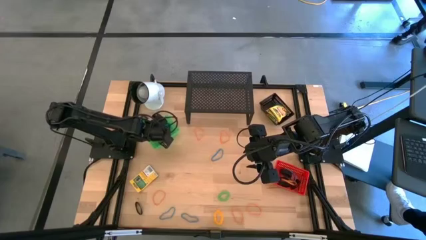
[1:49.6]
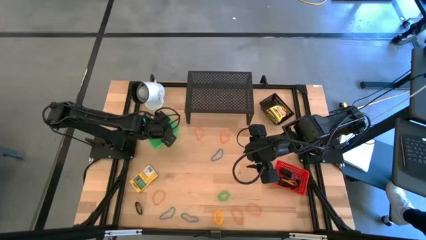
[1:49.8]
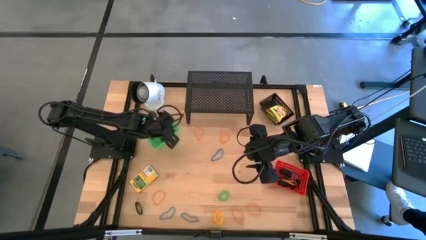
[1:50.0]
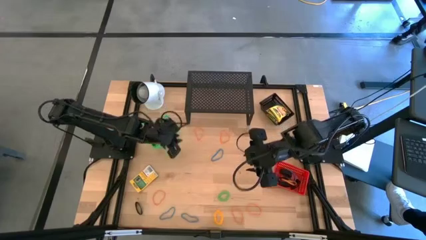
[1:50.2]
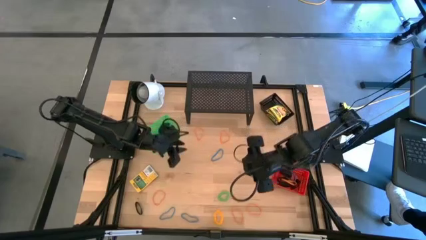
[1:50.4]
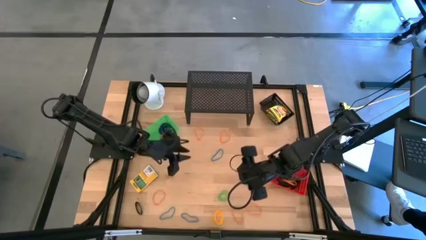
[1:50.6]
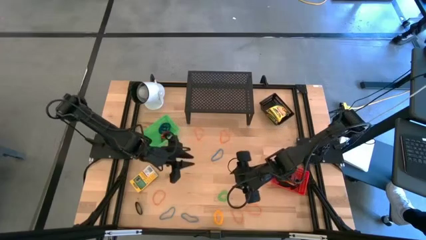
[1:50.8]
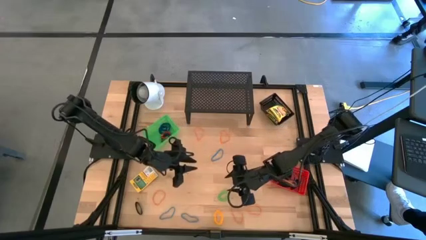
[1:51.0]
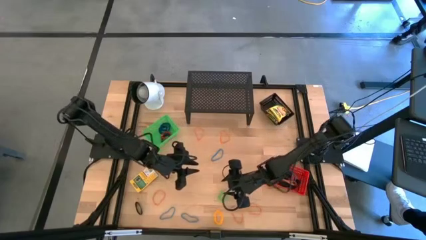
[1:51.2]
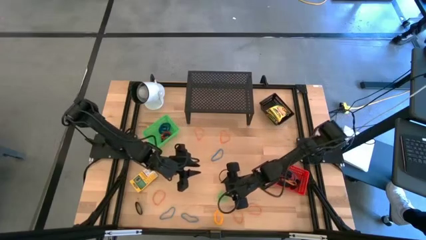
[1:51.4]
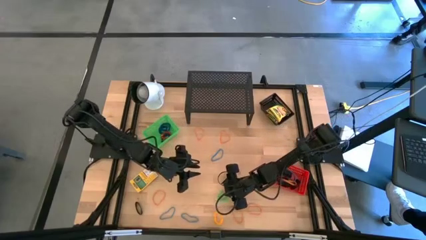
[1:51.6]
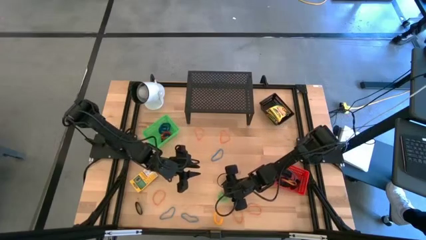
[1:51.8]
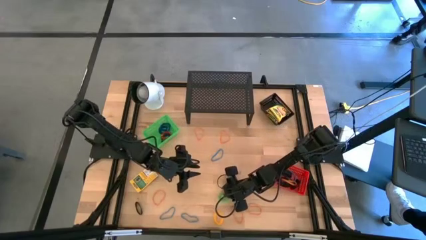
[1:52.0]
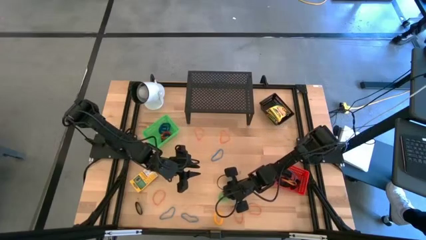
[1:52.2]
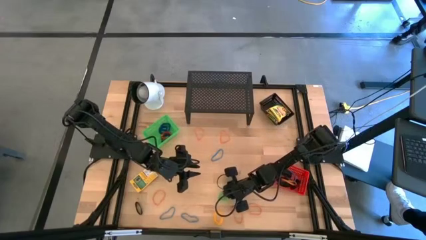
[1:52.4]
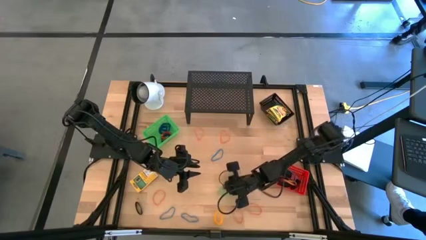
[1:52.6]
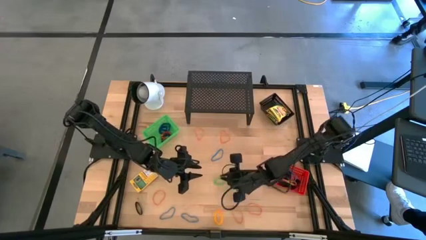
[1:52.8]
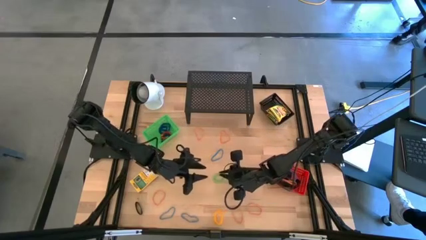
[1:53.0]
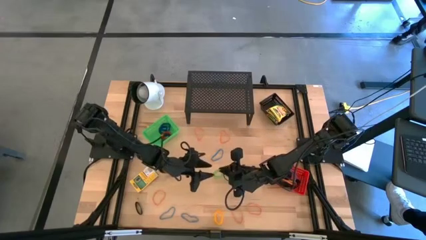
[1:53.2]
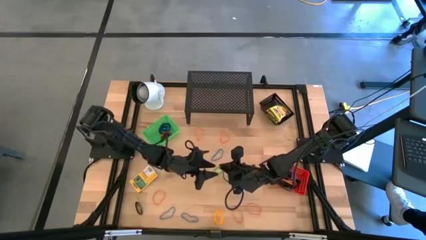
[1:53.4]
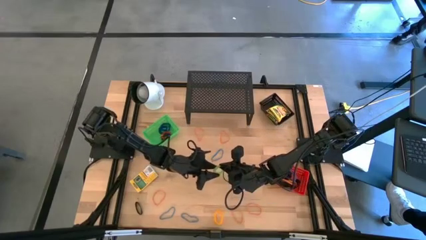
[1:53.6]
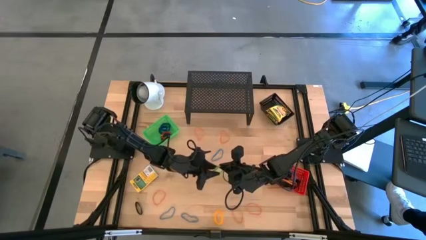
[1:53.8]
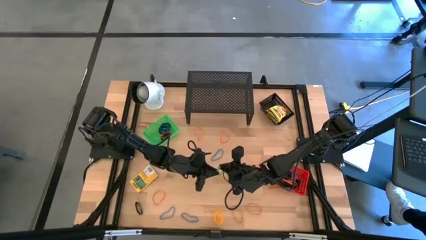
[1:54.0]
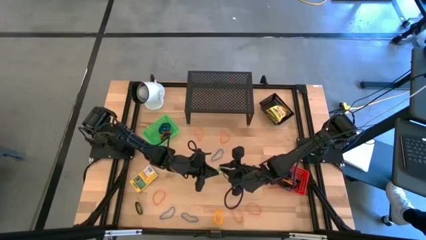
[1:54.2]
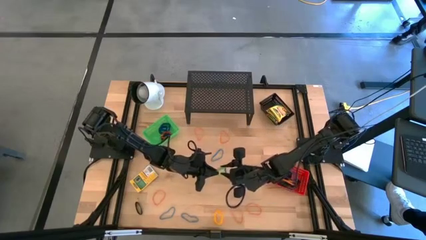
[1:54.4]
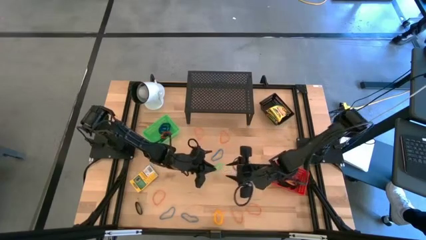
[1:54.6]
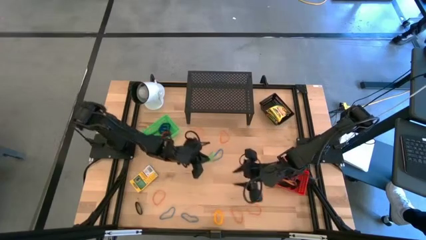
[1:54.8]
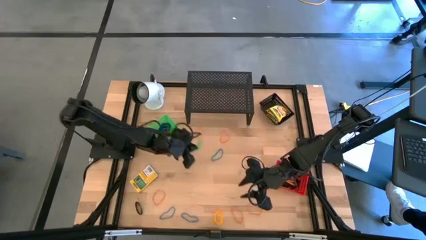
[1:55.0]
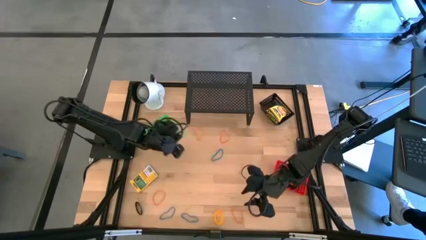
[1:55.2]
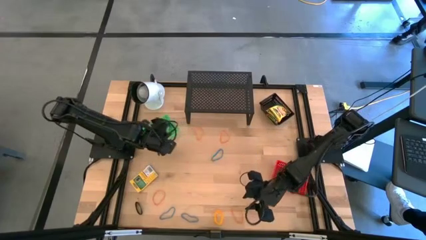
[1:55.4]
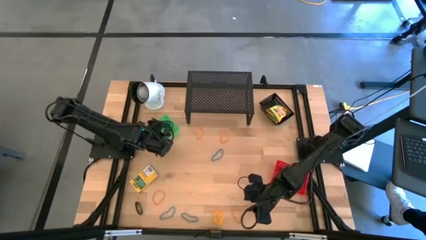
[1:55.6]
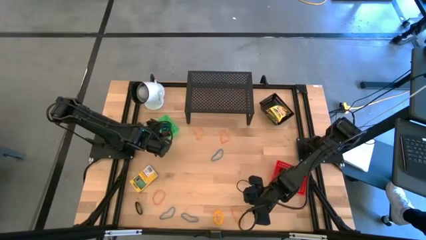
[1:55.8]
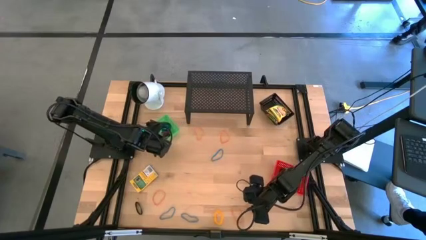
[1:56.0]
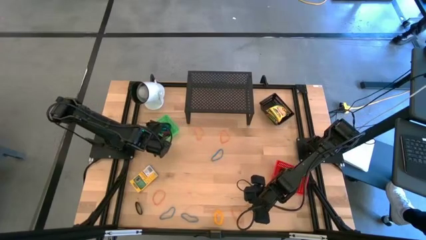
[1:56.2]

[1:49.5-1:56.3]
Task: Pick & Place Office Desk Supplies
Put the green spring keychain into the green bin

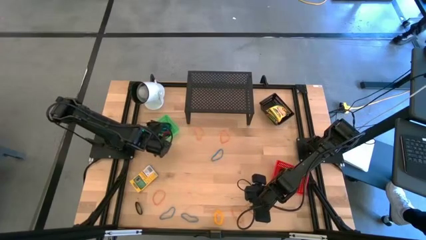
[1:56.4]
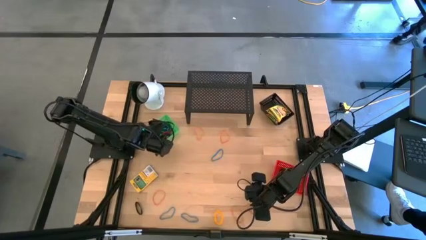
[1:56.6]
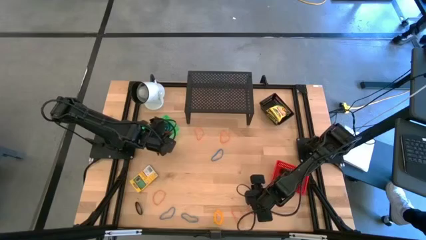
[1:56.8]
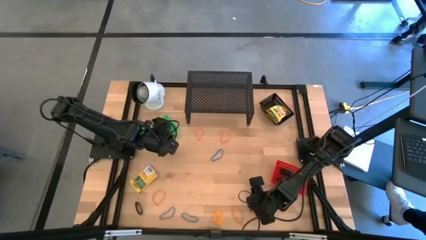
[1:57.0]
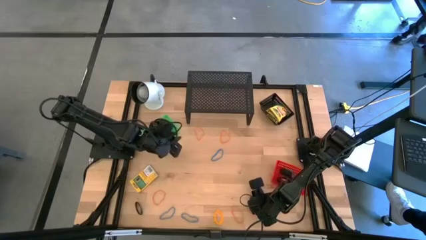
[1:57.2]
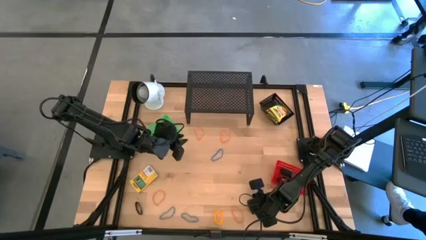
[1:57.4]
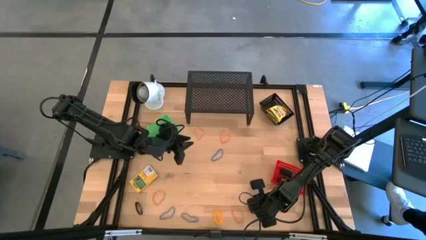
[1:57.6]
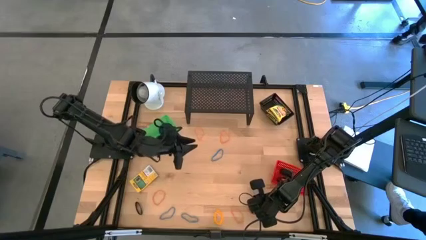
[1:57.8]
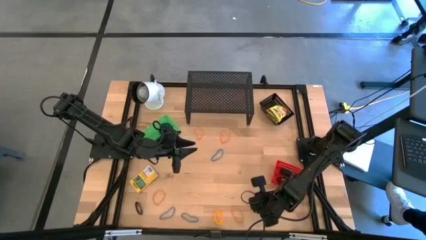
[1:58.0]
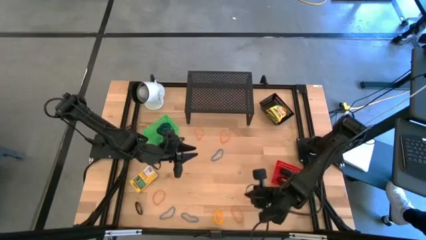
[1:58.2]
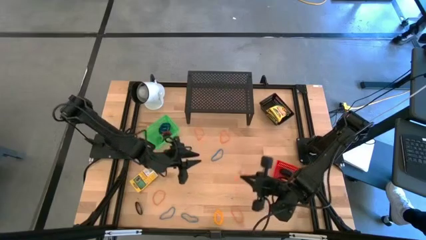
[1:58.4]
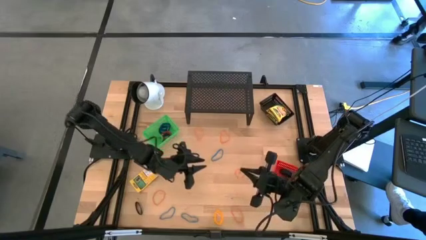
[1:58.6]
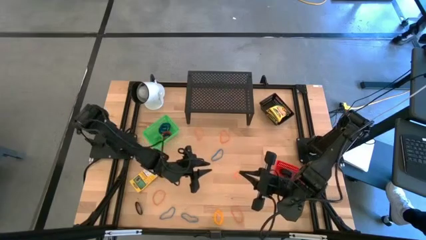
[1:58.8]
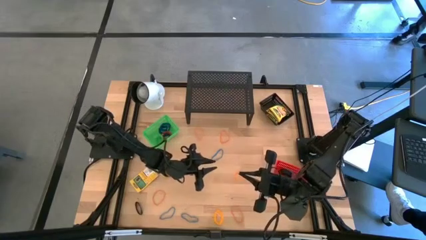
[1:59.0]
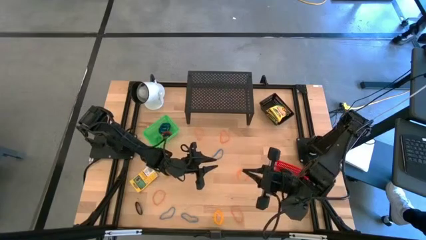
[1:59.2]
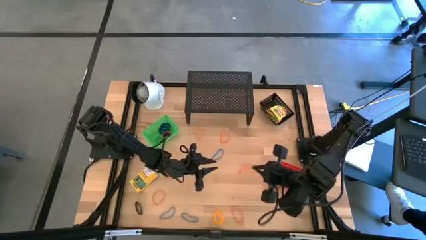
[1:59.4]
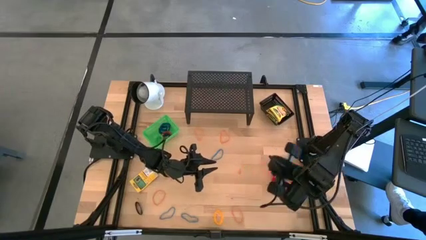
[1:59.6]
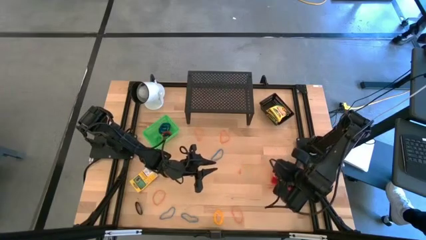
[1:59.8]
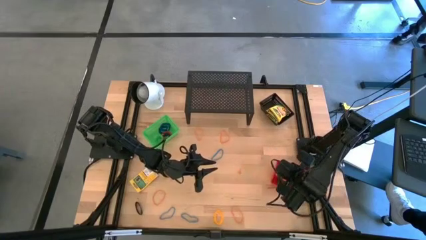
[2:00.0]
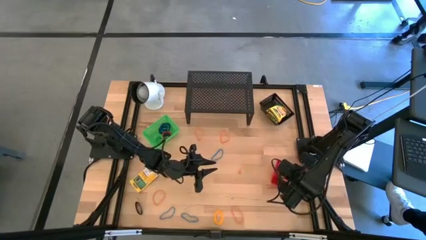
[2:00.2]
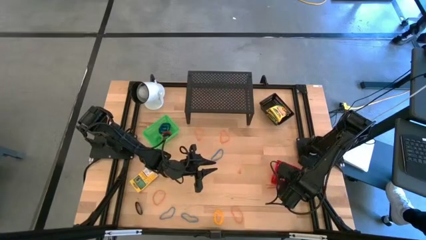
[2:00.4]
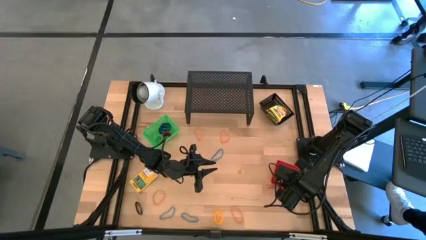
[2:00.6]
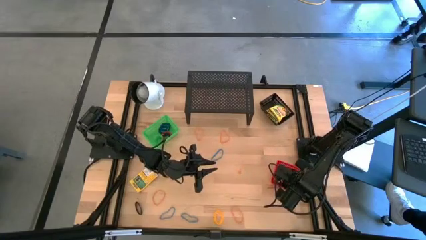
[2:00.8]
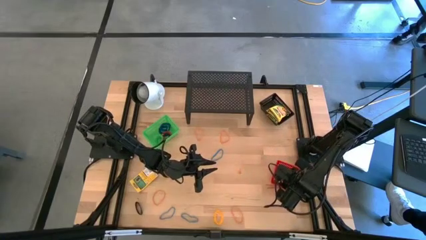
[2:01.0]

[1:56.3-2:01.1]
Put the orange rubber band into the red bin

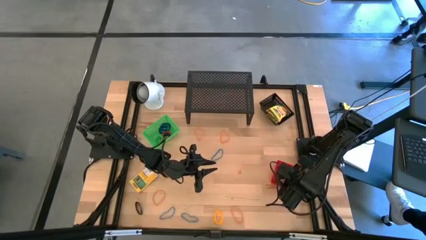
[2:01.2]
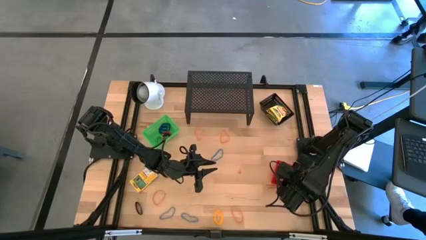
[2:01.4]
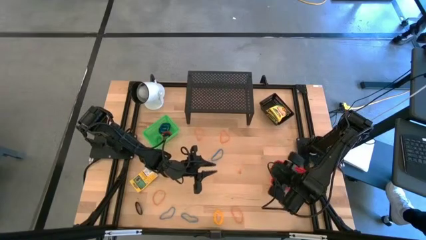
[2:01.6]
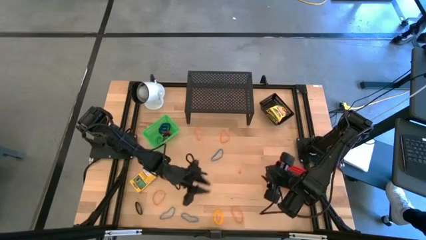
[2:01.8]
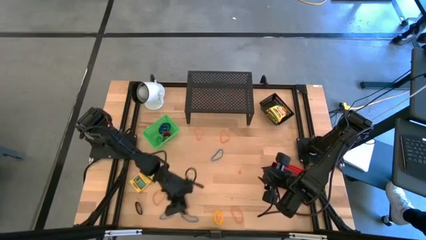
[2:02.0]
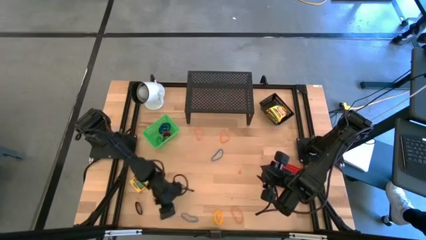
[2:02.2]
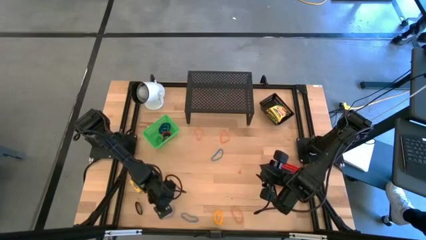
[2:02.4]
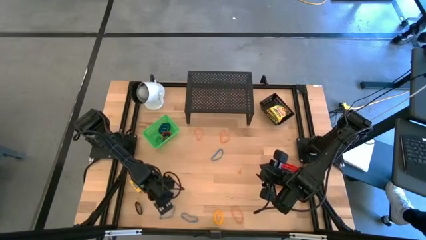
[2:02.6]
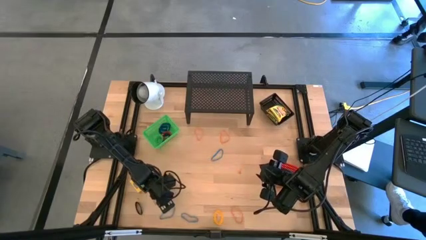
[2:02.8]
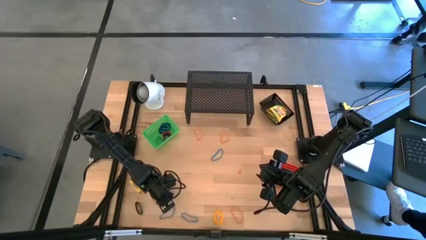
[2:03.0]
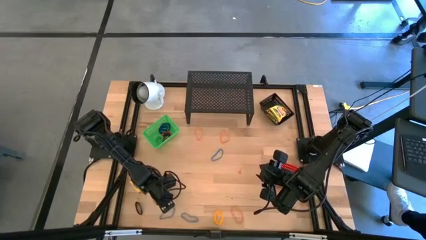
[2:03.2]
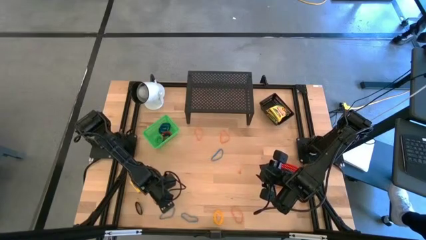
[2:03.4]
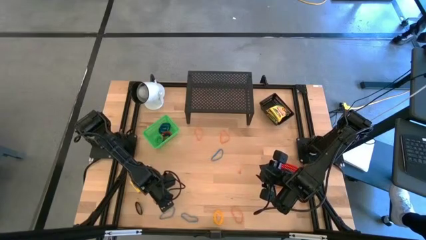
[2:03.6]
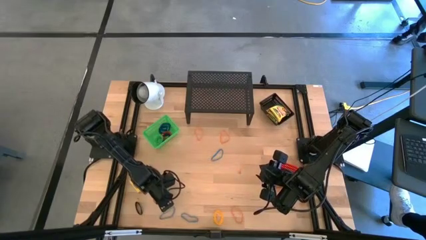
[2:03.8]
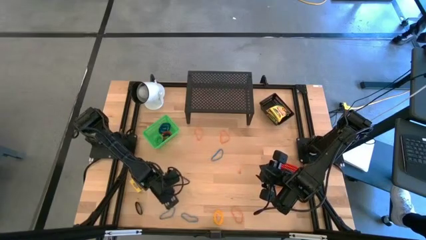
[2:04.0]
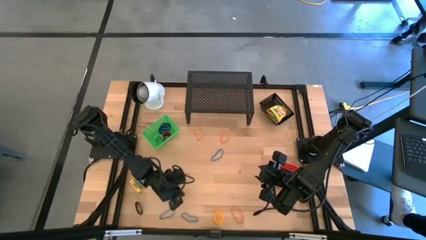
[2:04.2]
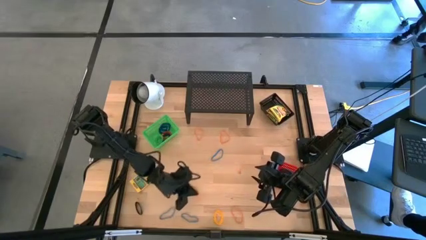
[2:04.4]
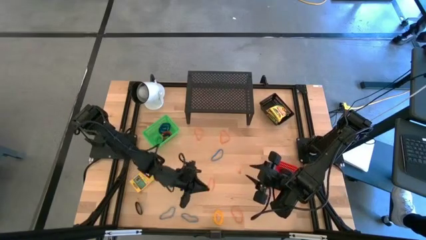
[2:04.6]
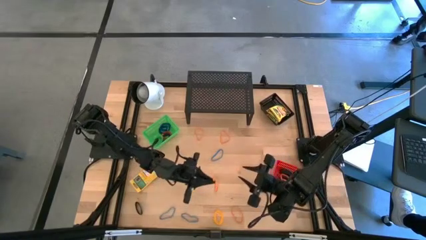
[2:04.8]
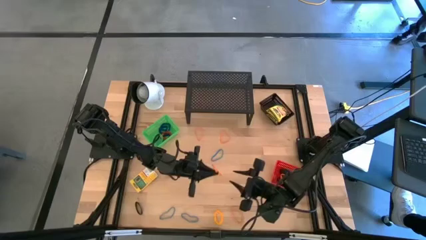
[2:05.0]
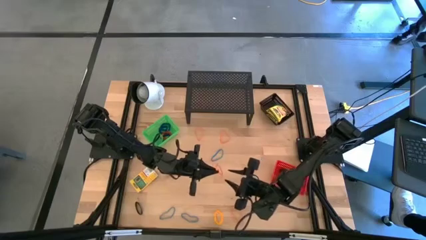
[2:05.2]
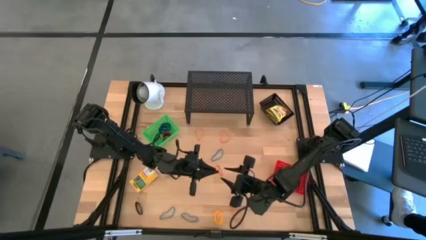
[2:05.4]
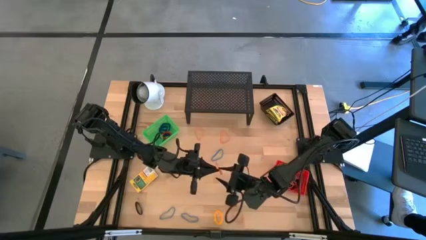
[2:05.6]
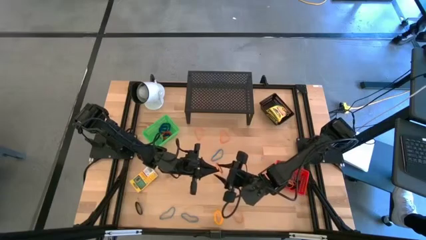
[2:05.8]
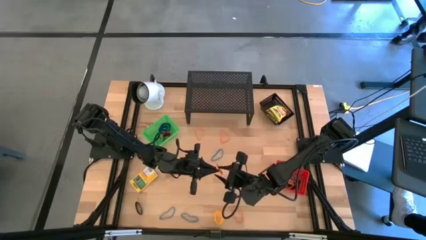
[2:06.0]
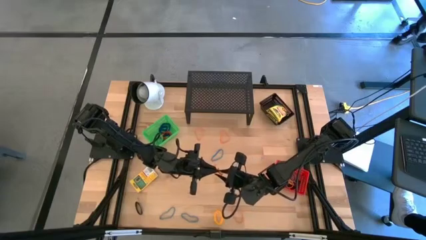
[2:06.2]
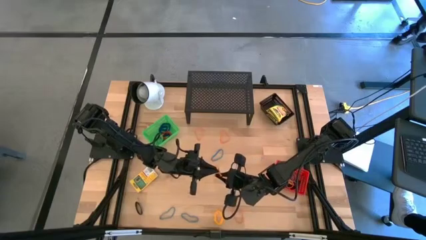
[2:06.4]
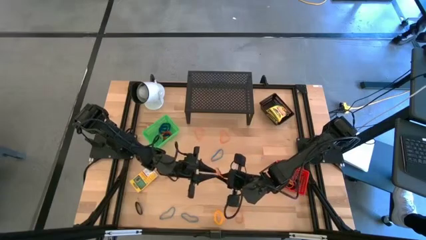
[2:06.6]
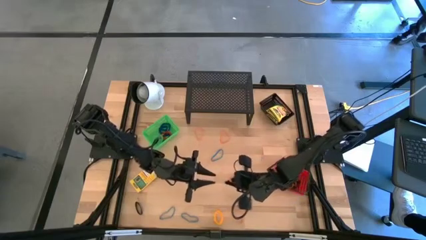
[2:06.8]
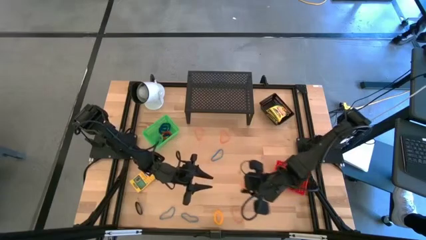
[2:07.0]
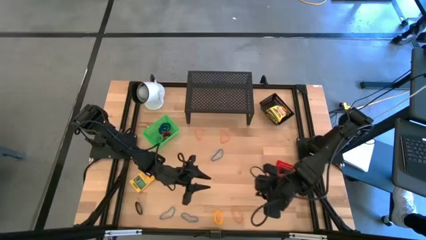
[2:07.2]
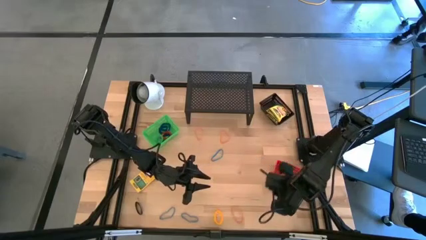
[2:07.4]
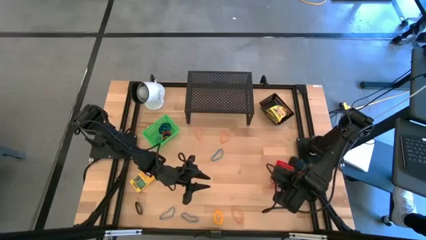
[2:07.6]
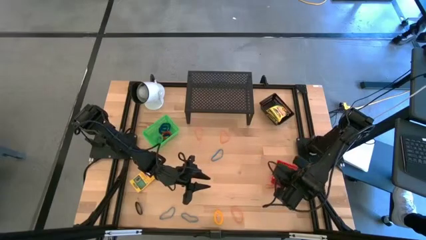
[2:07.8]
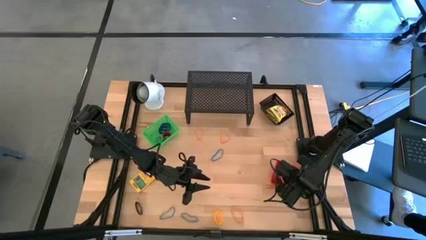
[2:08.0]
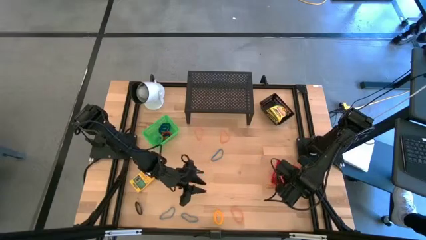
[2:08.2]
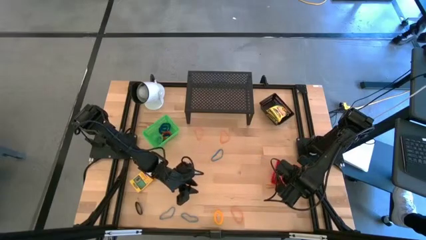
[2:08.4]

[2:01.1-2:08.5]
Put the orange rubber band into the red bin
